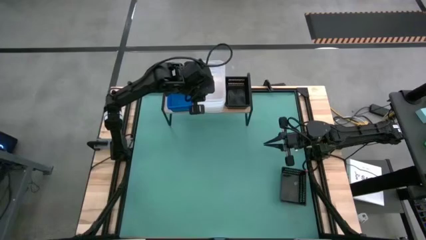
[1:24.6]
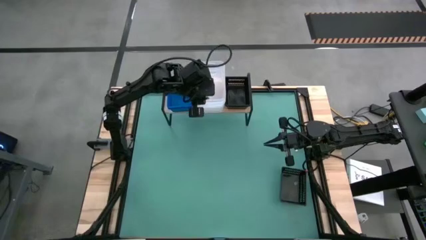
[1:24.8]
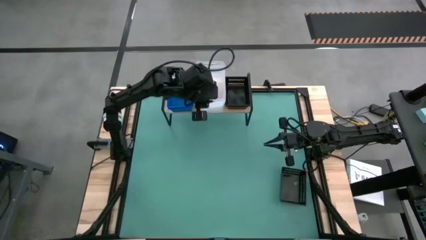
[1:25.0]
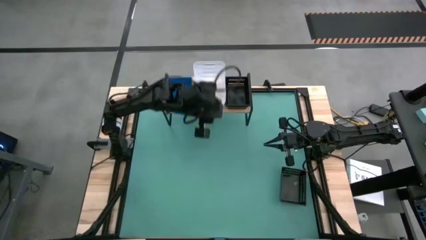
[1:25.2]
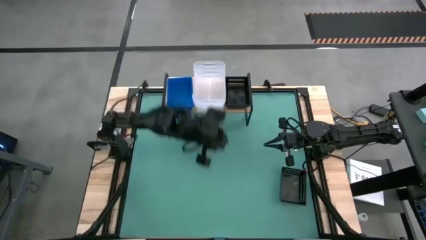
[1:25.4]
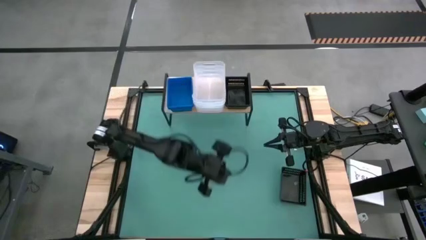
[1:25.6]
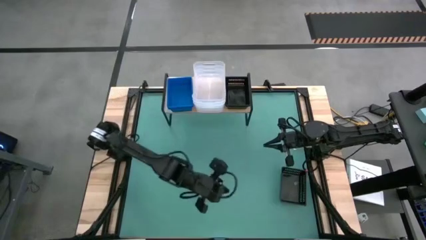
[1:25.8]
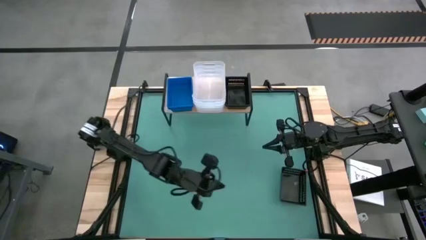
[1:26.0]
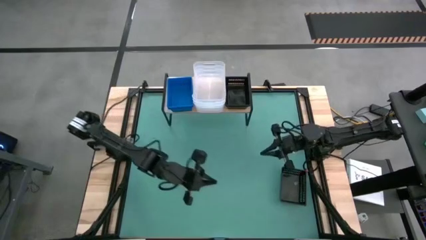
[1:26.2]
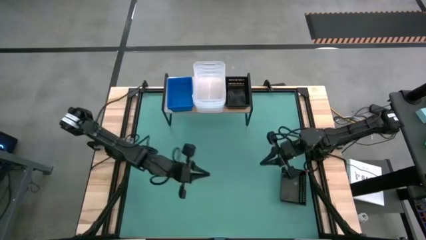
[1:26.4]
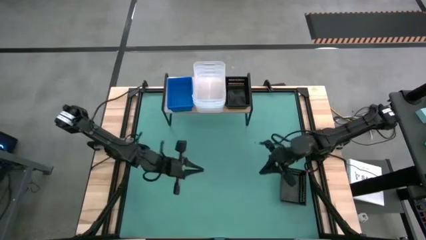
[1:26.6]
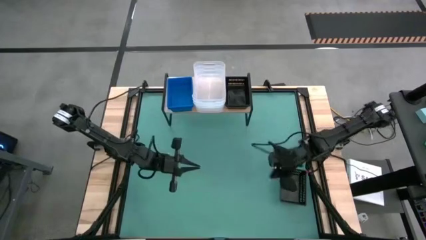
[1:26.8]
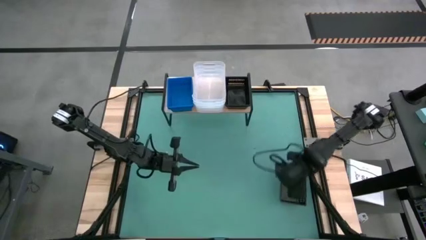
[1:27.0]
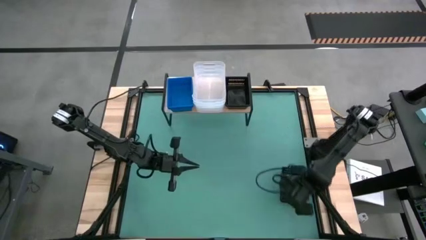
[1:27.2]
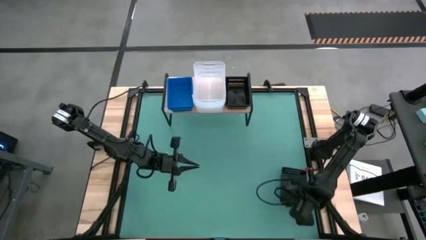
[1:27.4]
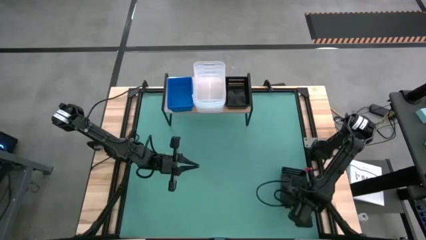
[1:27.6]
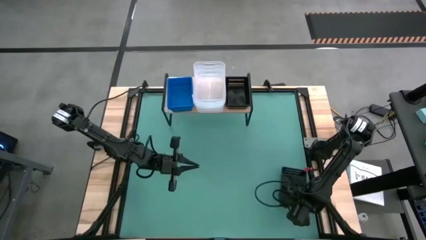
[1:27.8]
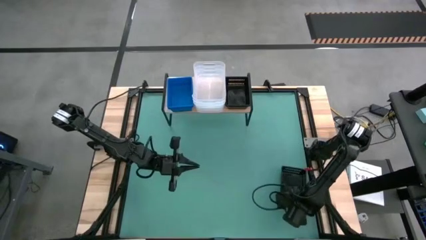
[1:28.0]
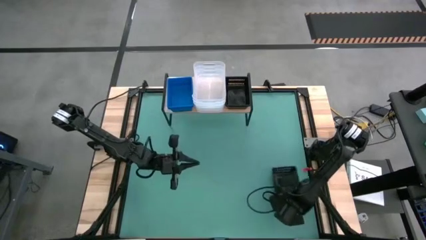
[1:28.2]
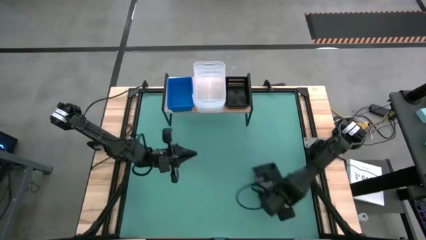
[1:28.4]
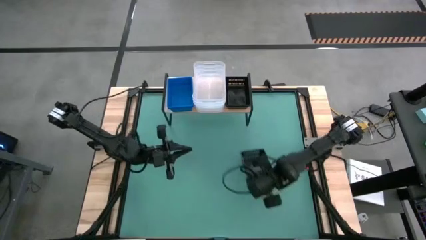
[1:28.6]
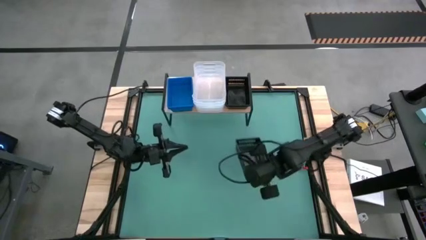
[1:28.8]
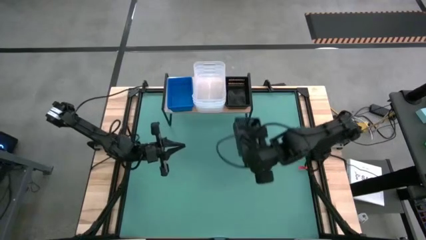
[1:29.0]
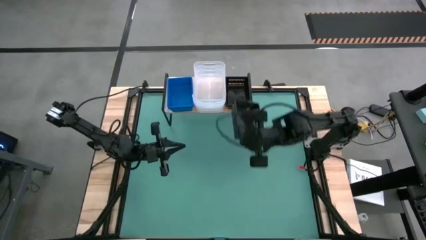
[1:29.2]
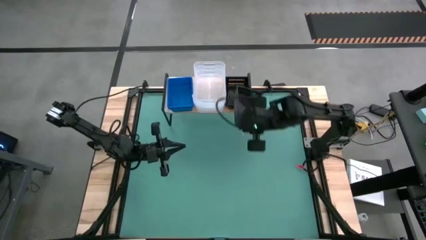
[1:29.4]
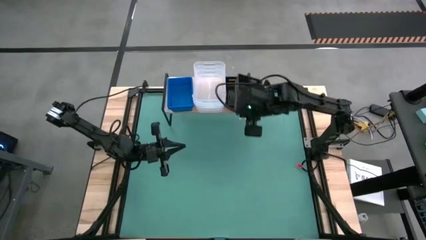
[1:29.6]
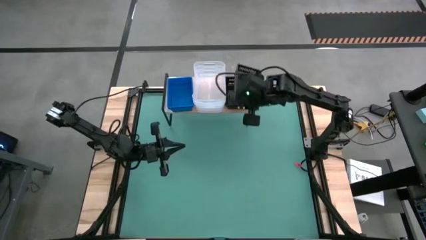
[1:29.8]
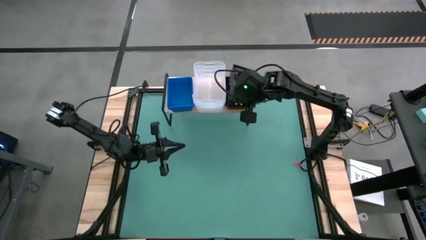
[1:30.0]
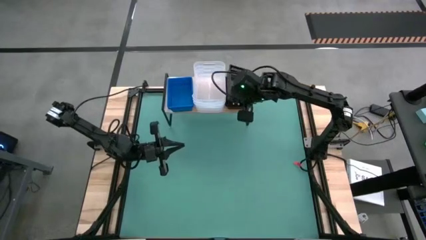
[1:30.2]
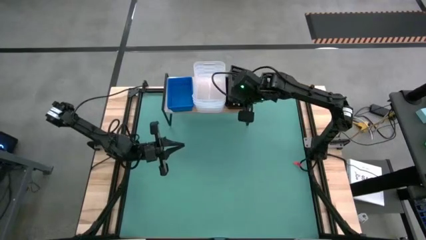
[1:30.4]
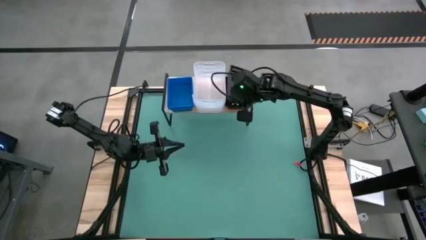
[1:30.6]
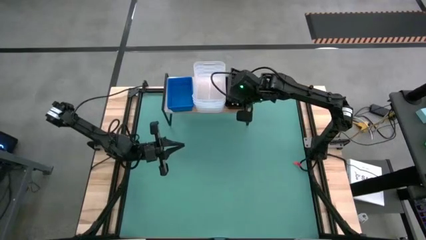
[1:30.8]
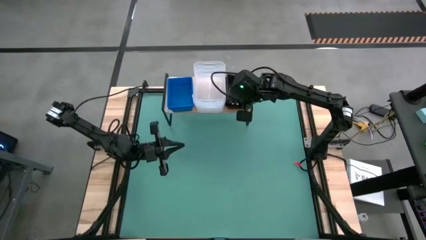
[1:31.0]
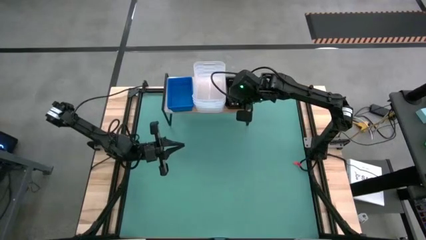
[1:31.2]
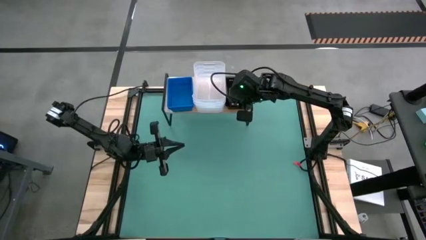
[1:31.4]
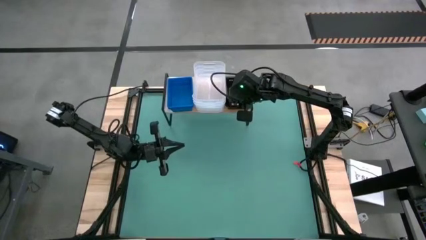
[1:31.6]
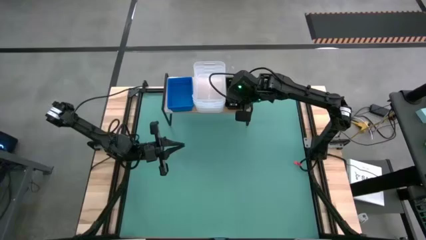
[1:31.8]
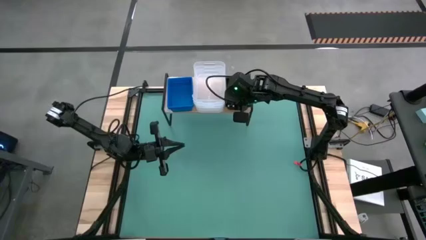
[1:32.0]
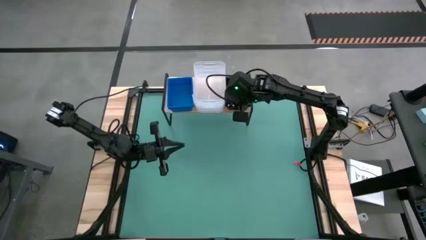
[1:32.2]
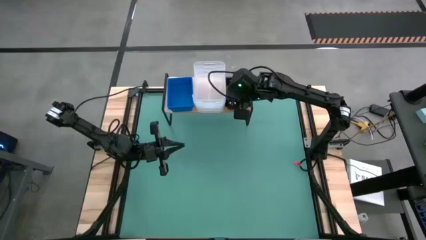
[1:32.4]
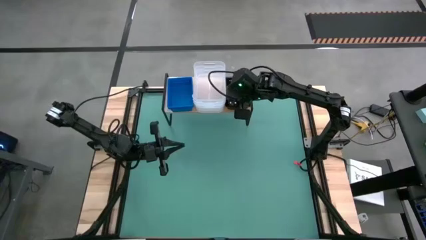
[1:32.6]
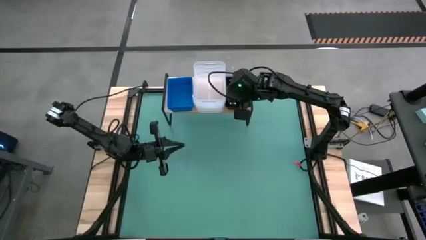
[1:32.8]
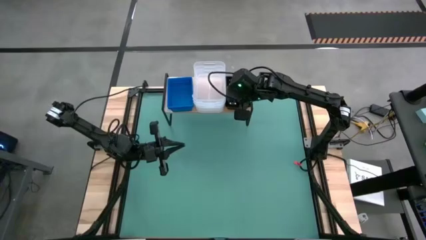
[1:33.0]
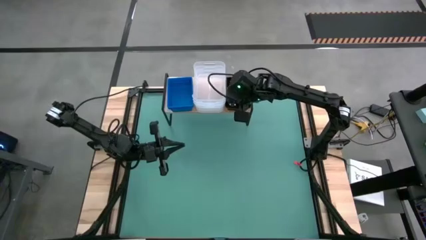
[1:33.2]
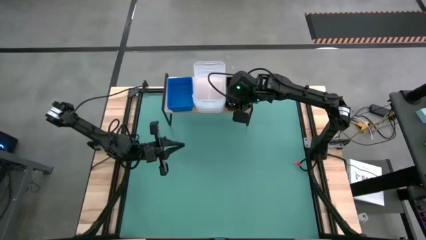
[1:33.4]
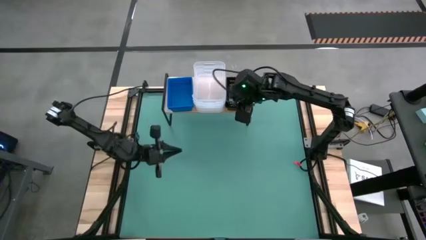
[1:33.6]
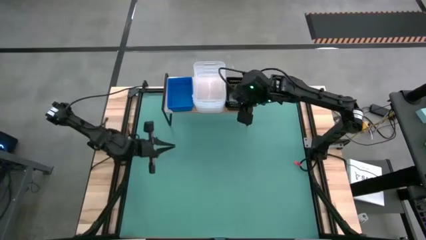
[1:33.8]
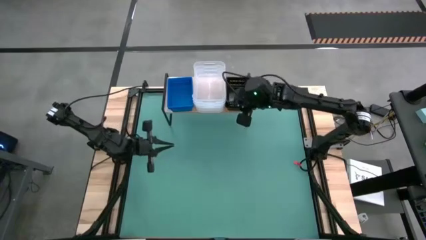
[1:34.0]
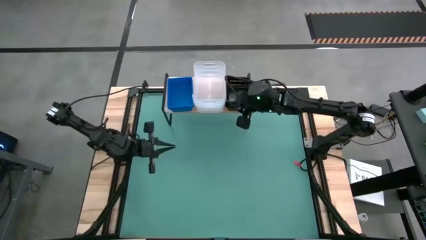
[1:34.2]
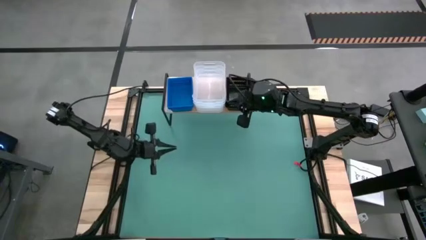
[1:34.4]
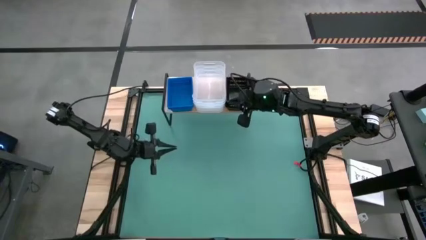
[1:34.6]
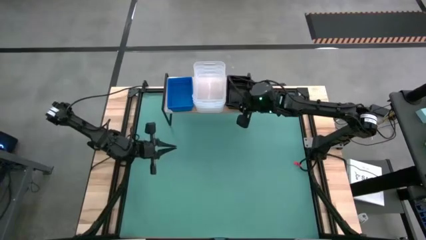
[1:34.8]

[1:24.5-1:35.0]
Task: Stack baskets on shelf by color
Stack the black bin on the black bins on the shelf

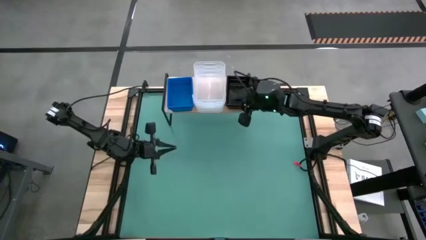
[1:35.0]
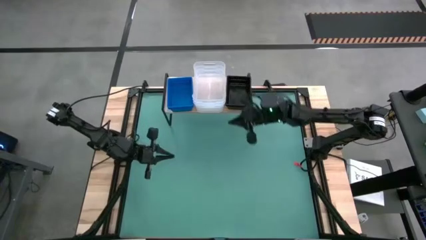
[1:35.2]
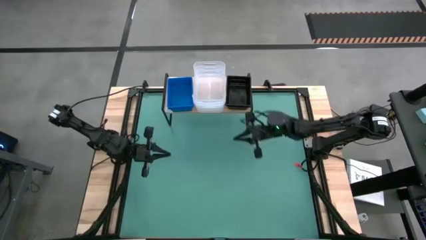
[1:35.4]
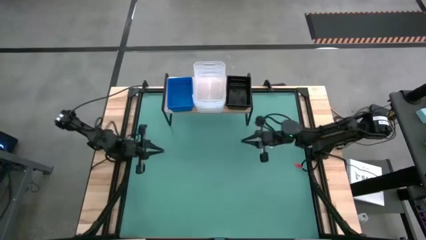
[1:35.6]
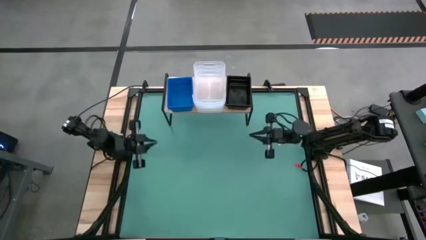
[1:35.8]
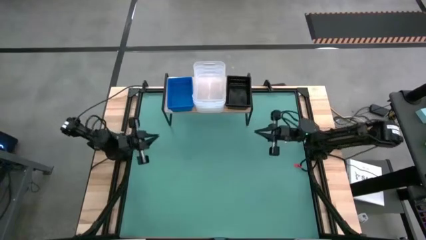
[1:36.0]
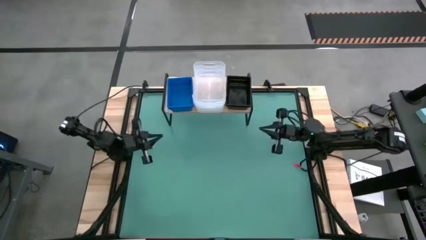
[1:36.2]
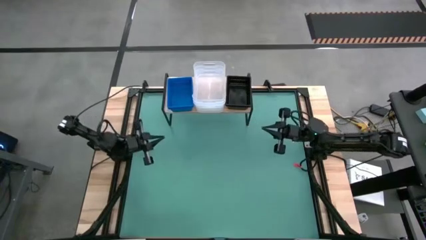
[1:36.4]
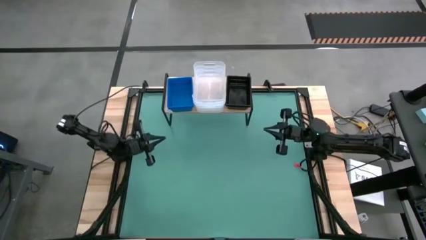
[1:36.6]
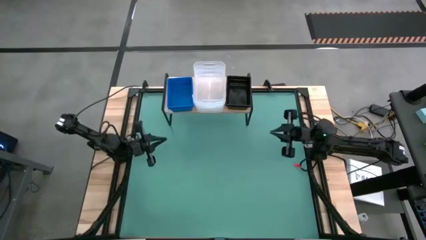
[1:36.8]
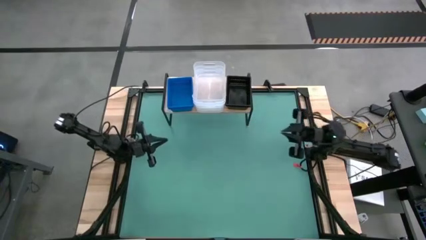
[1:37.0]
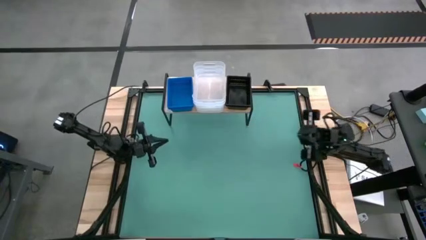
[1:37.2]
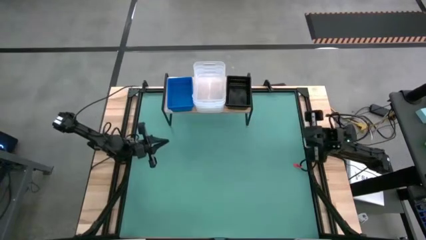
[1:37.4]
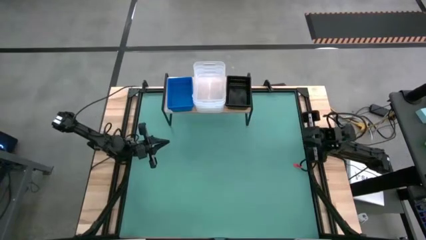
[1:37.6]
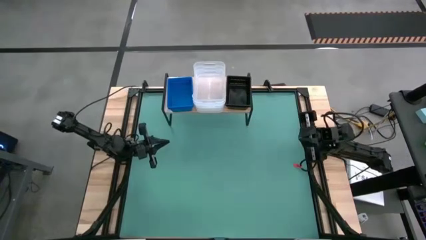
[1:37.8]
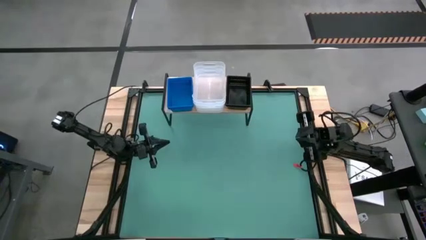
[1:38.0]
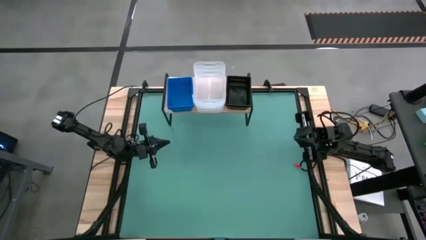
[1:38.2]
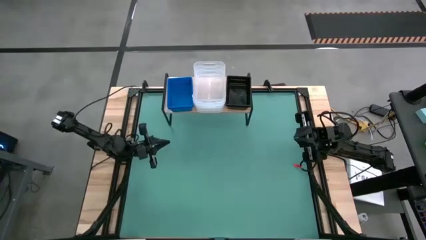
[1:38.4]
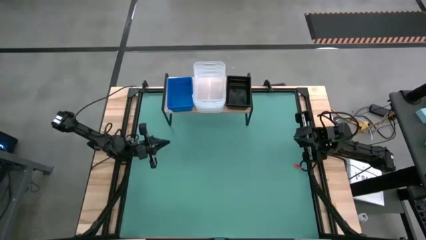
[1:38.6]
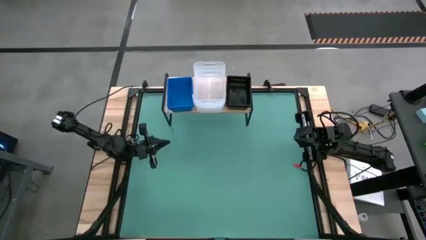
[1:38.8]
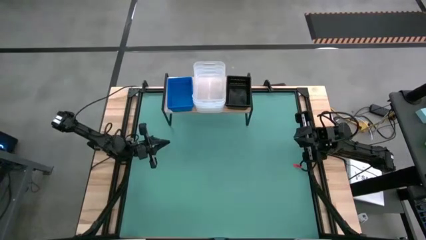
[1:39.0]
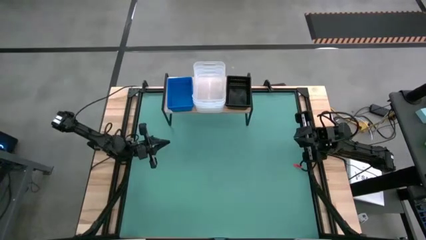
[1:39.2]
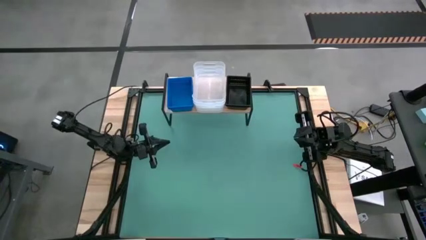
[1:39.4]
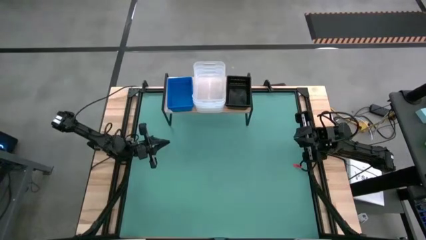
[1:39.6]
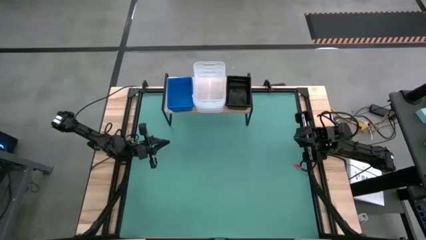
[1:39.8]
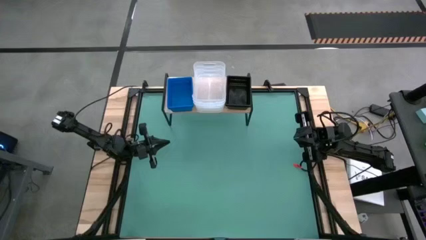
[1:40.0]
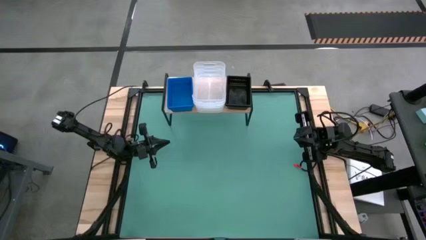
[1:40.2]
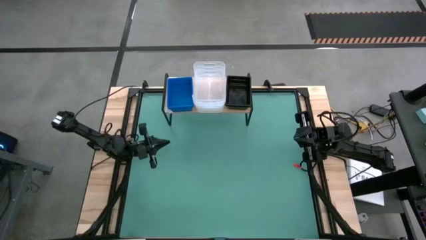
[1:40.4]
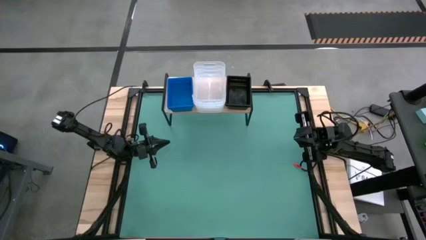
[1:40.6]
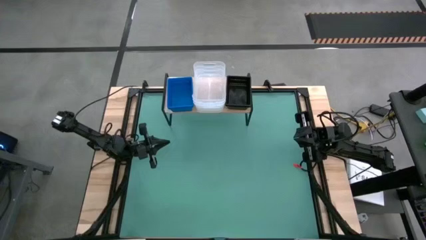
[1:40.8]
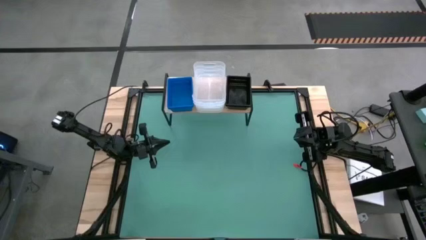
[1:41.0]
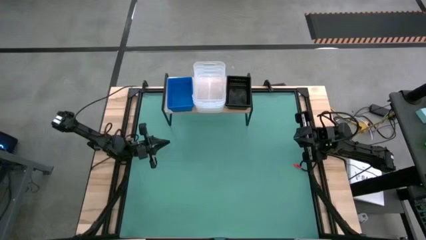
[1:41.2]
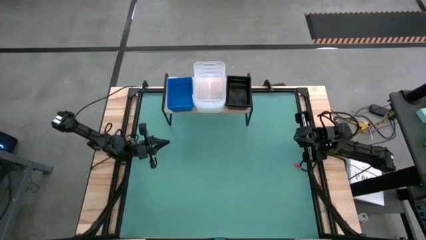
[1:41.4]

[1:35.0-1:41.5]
Return to Home Position
